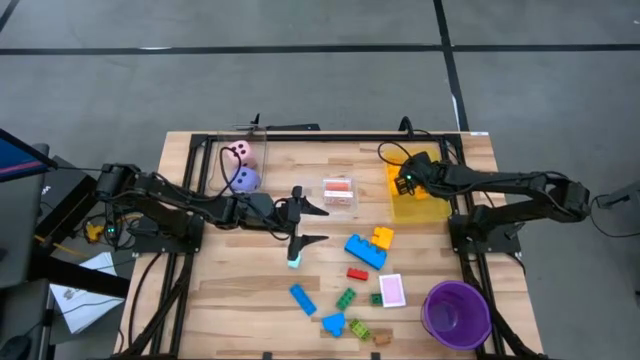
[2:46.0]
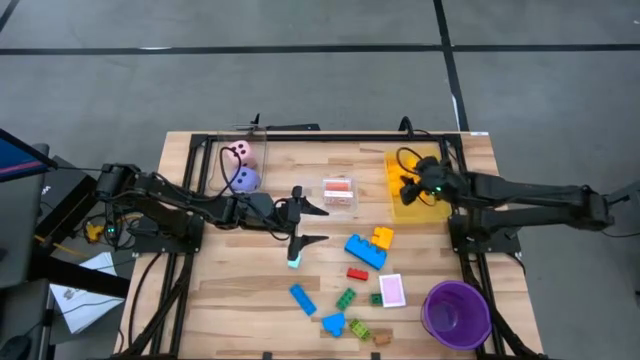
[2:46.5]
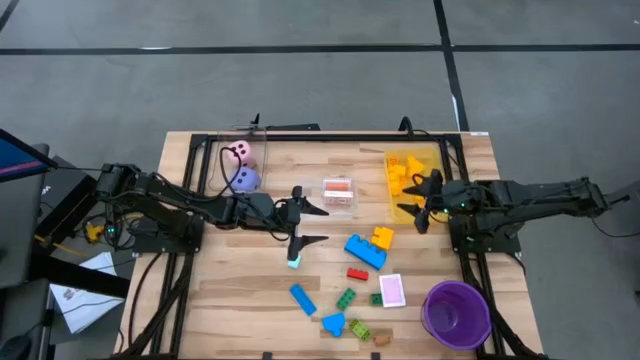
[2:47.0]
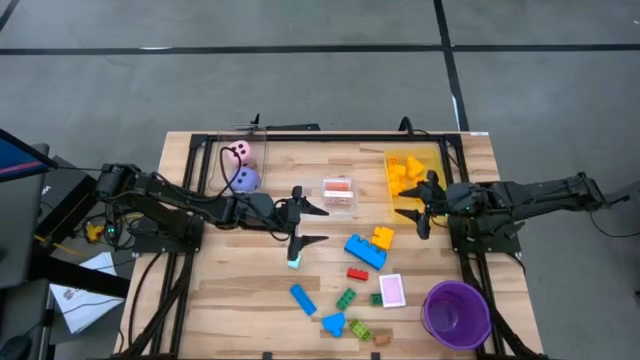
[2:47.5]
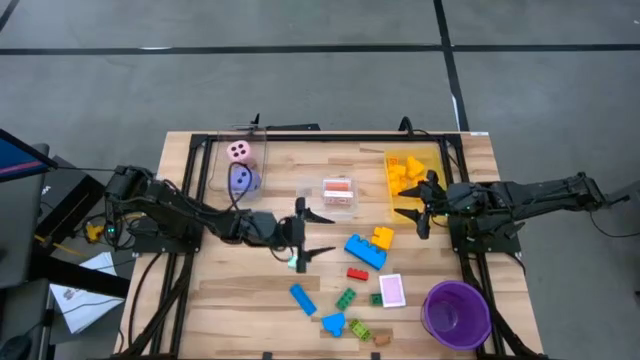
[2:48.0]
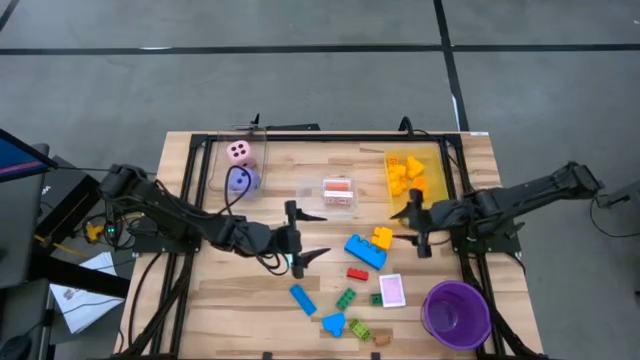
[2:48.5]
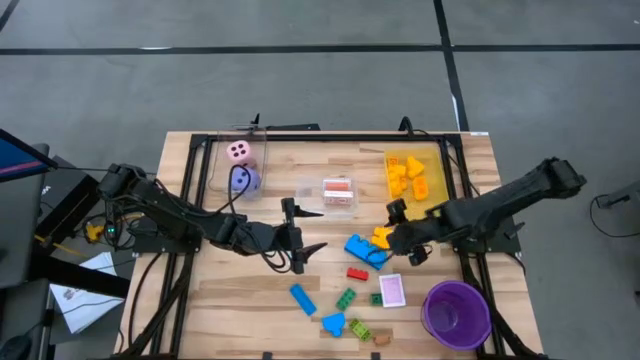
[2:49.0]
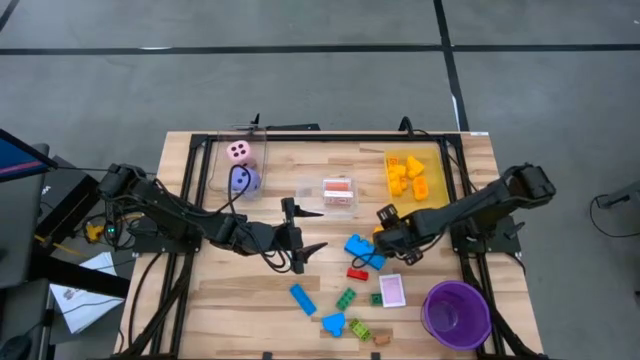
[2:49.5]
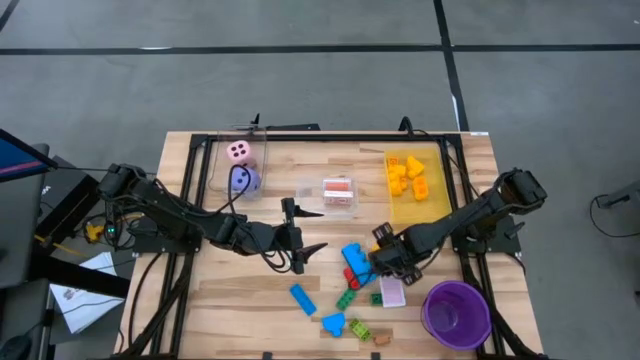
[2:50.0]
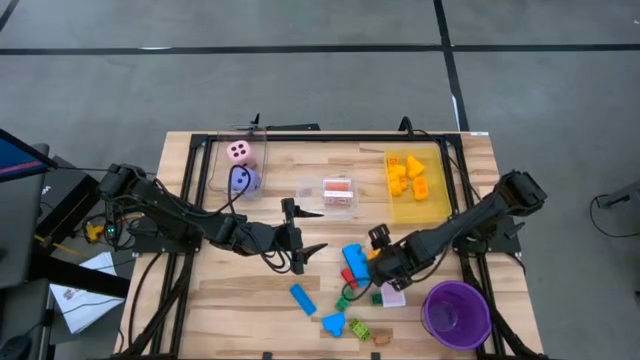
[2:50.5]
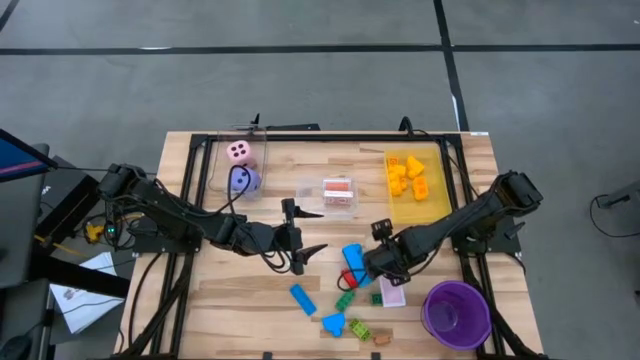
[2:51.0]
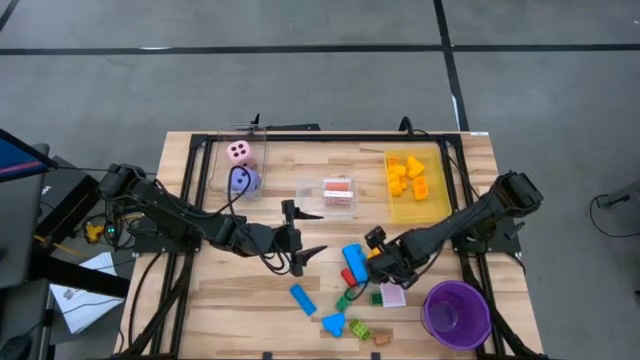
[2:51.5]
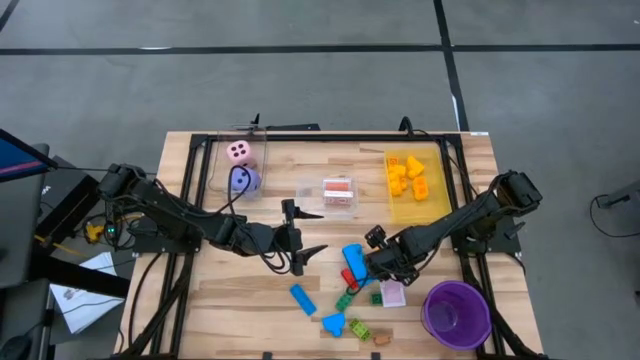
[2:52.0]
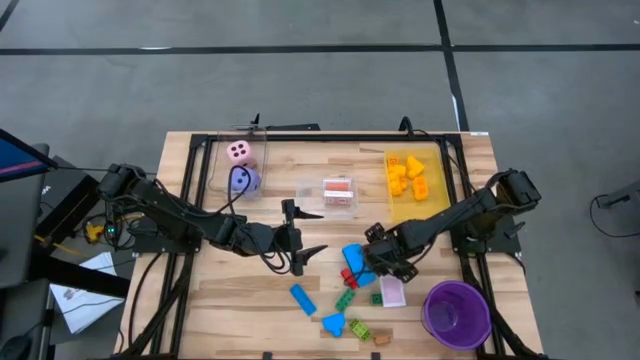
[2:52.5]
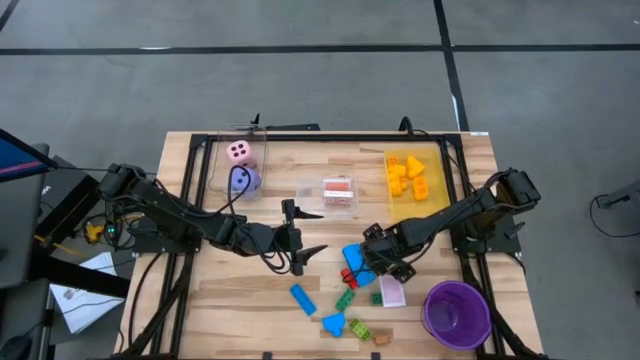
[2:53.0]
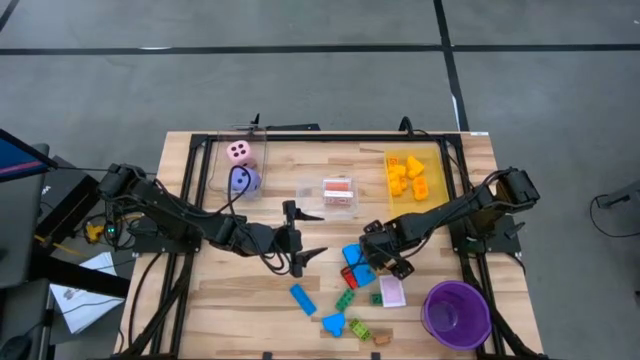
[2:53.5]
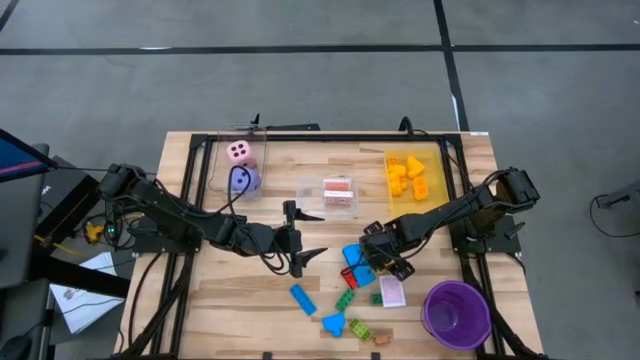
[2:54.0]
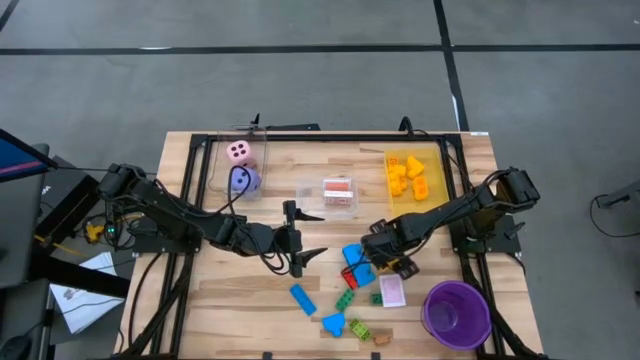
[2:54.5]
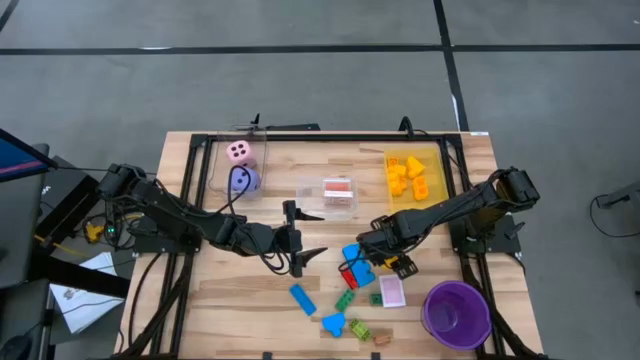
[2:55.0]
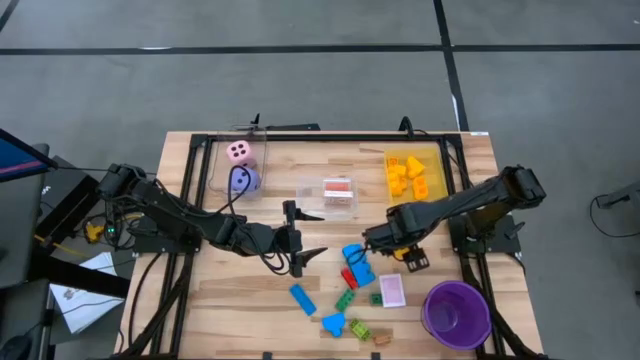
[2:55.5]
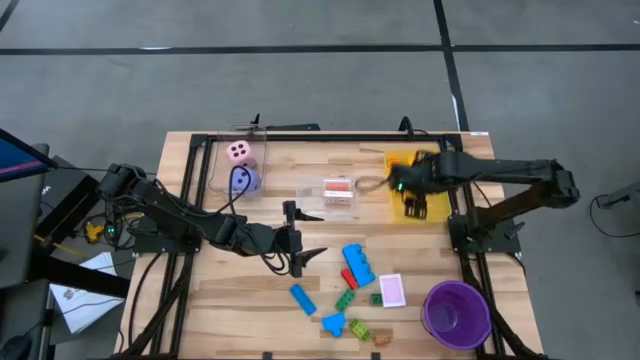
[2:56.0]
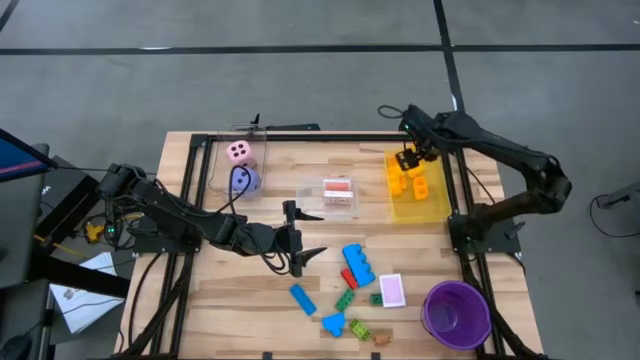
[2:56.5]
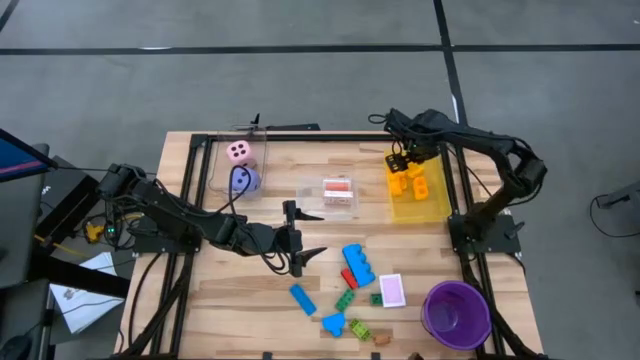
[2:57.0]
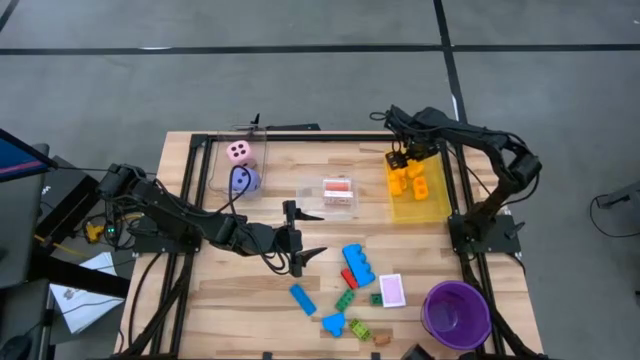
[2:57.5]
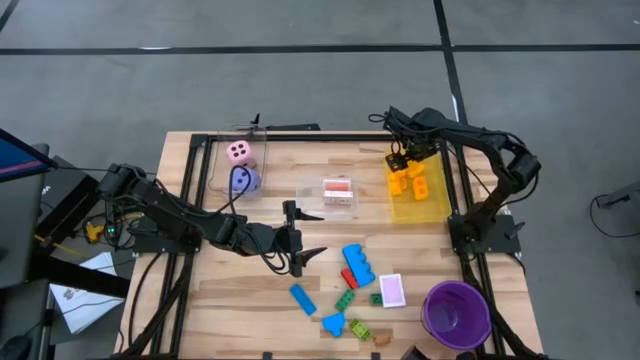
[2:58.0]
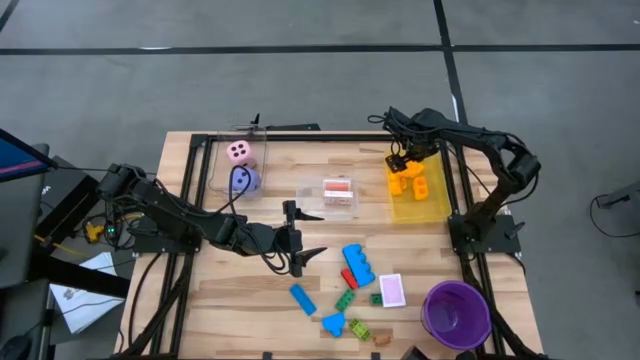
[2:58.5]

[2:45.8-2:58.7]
Task: Pick & Place Toys
Put the yellow game piece into the yellow bin

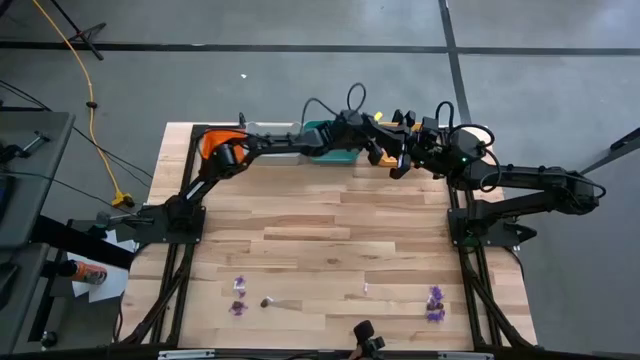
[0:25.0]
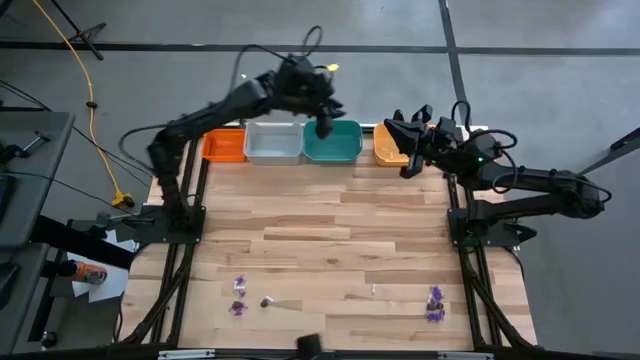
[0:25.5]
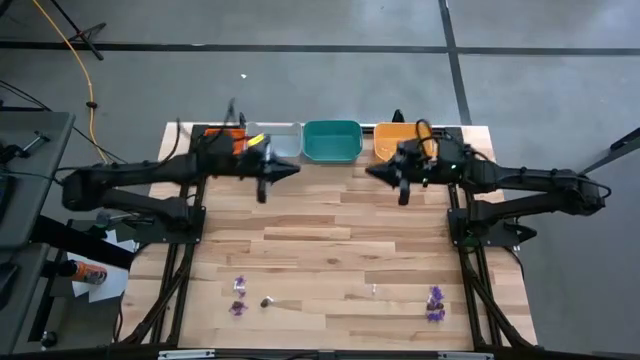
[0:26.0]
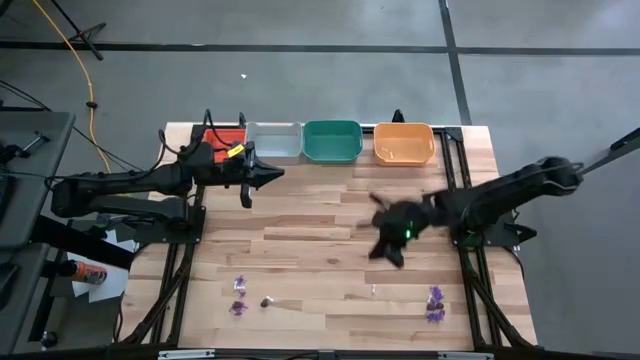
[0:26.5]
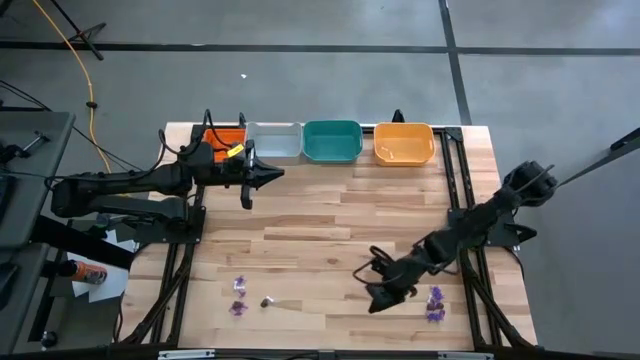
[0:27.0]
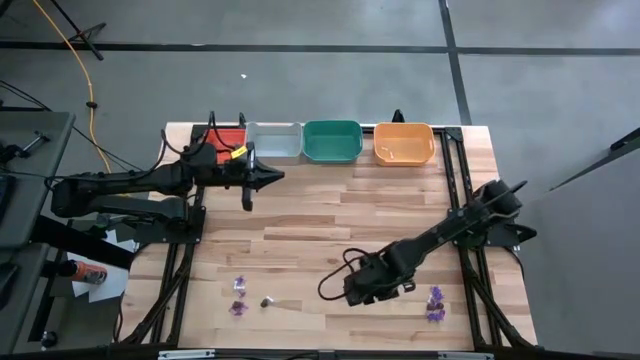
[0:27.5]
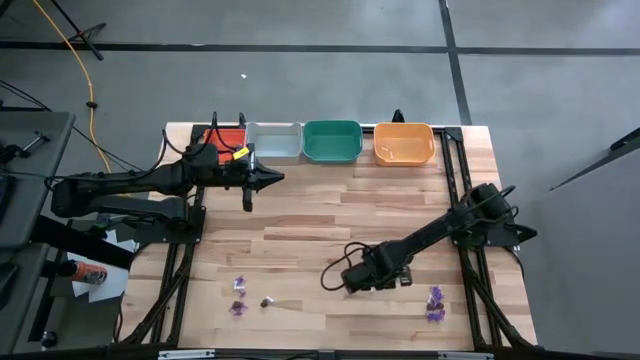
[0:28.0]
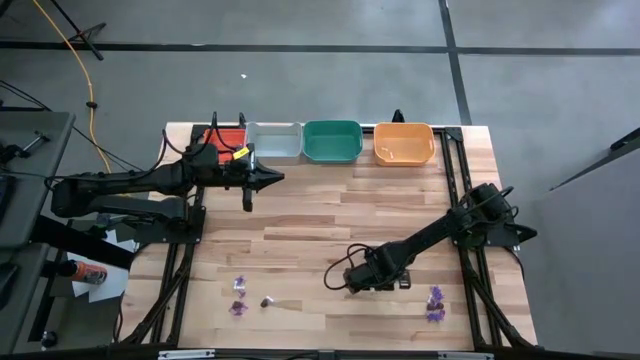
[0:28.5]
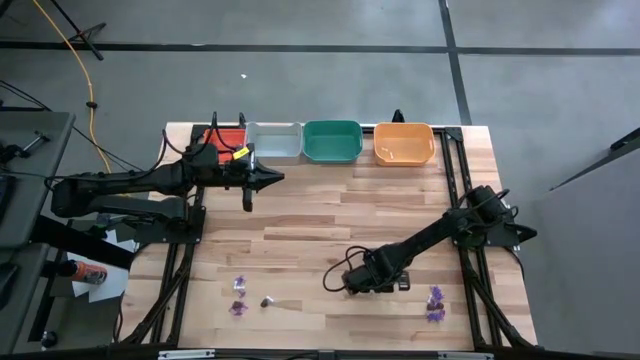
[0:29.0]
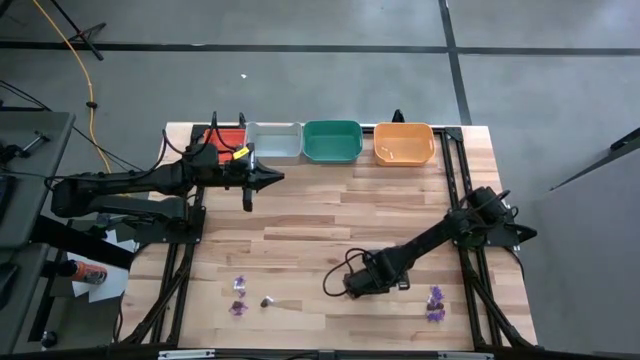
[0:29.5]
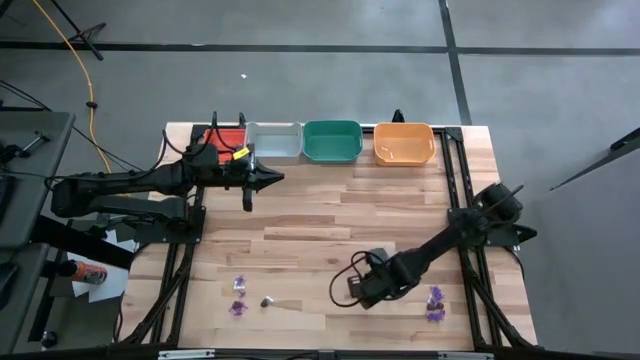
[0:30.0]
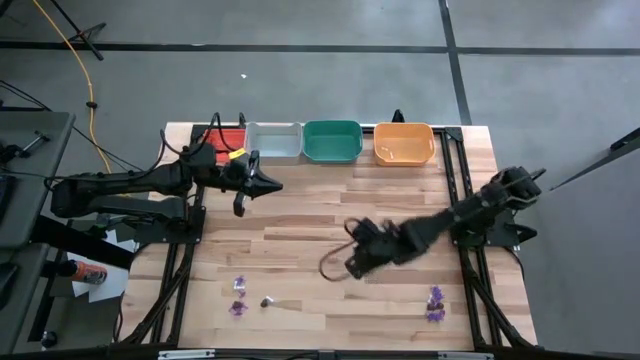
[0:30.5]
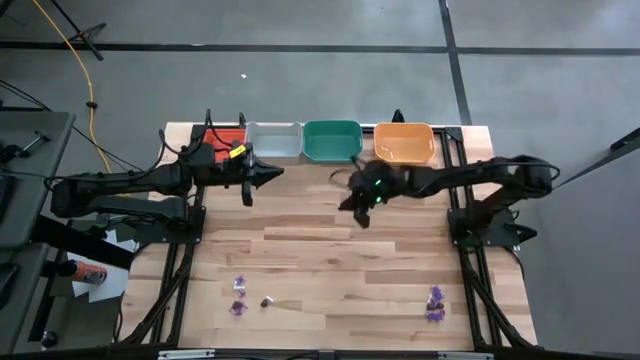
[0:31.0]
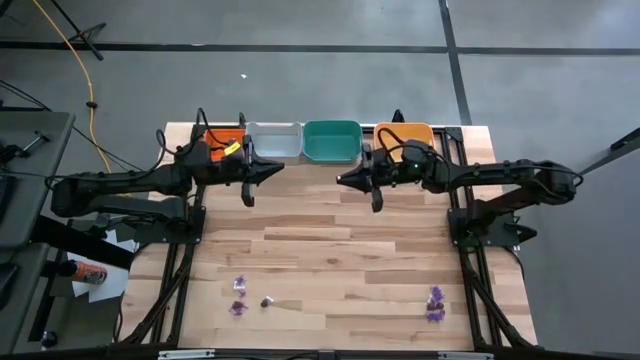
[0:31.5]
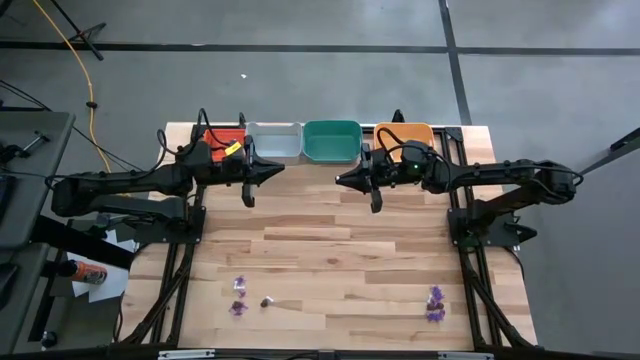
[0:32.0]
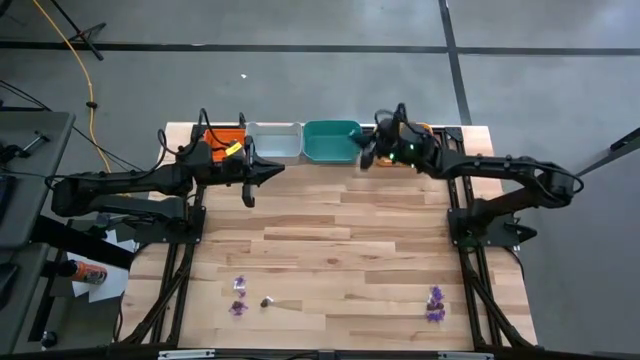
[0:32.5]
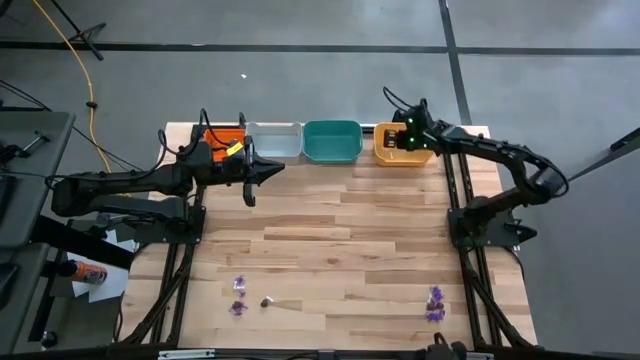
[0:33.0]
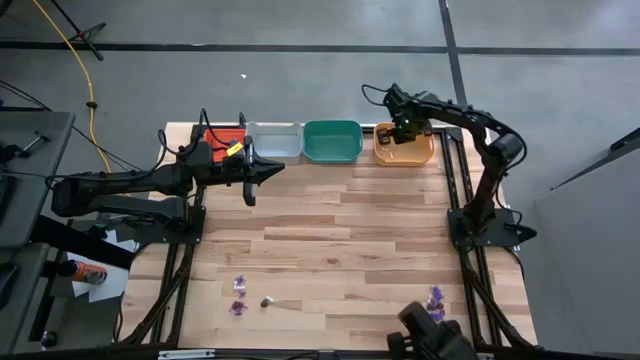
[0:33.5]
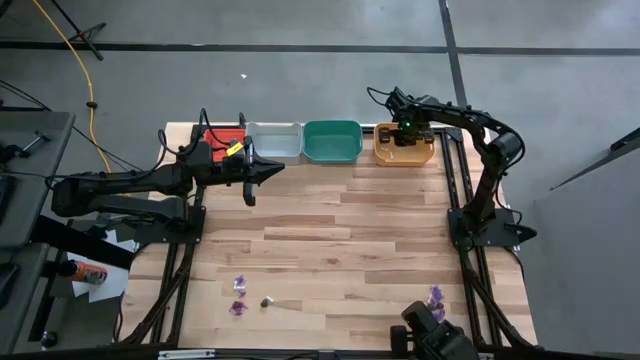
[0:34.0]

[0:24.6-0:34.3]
Task: Sort Halloween decoration
Put the white bone into the yellow bin
